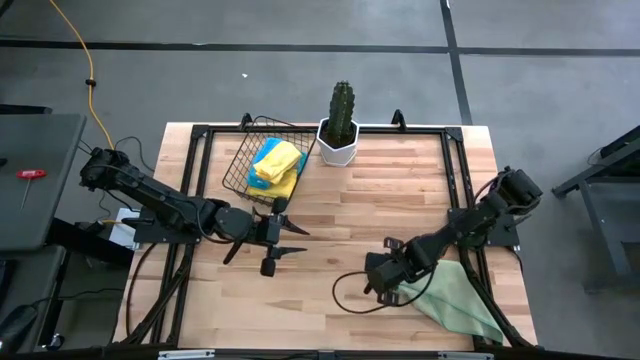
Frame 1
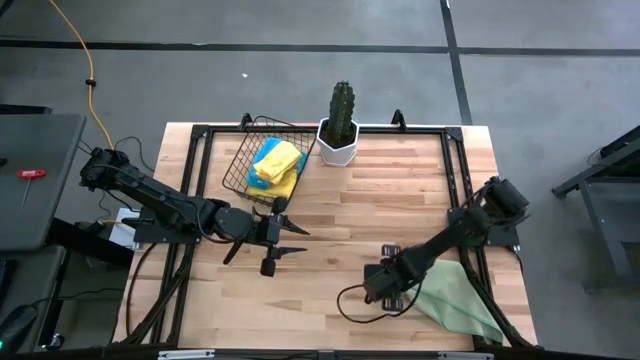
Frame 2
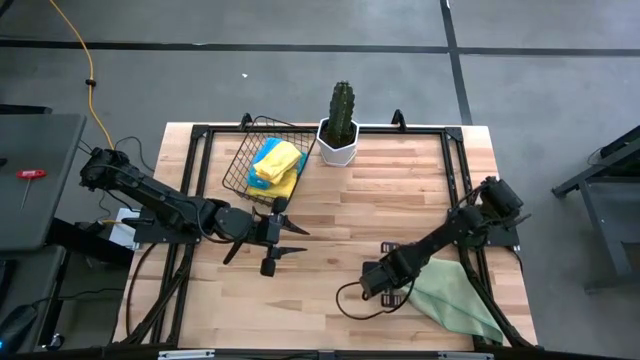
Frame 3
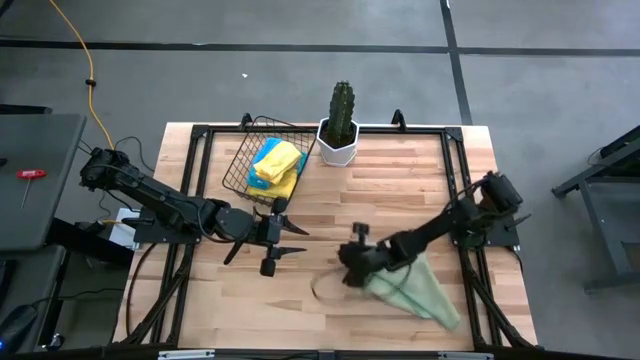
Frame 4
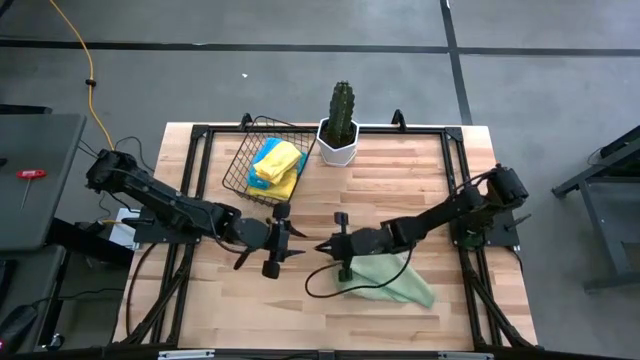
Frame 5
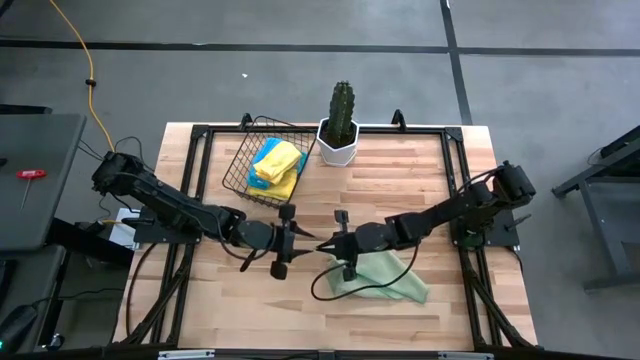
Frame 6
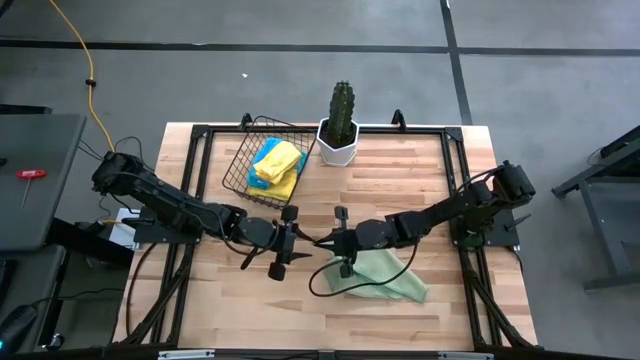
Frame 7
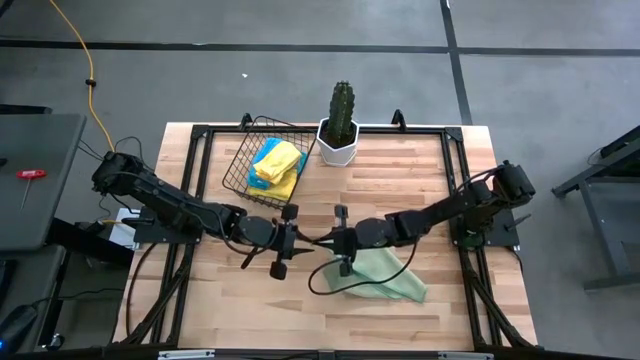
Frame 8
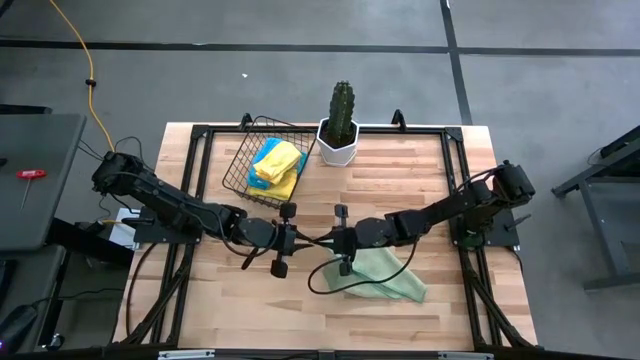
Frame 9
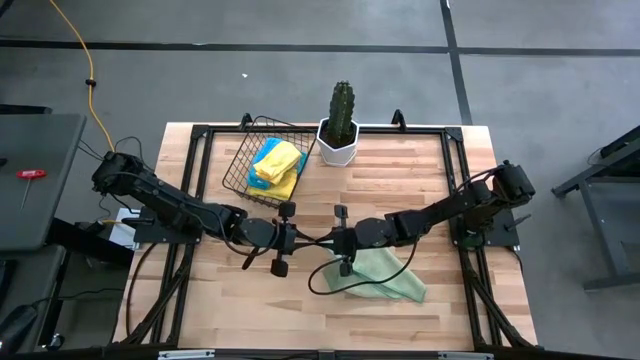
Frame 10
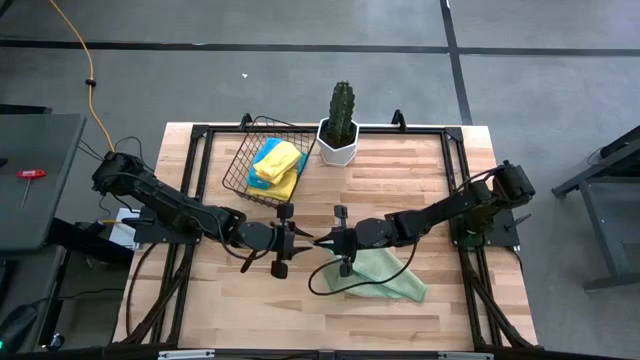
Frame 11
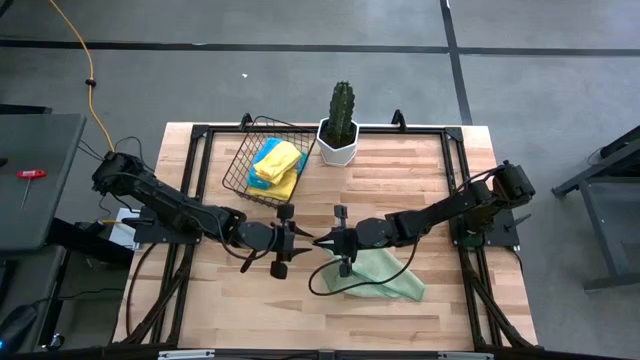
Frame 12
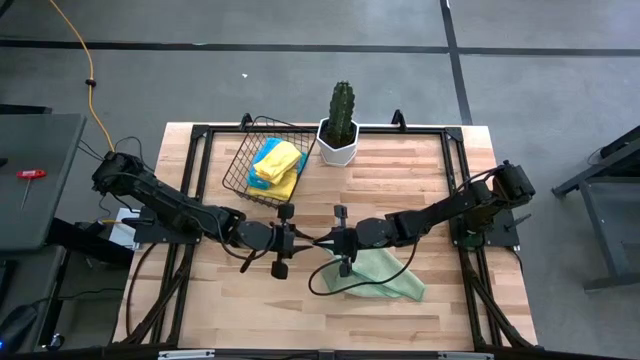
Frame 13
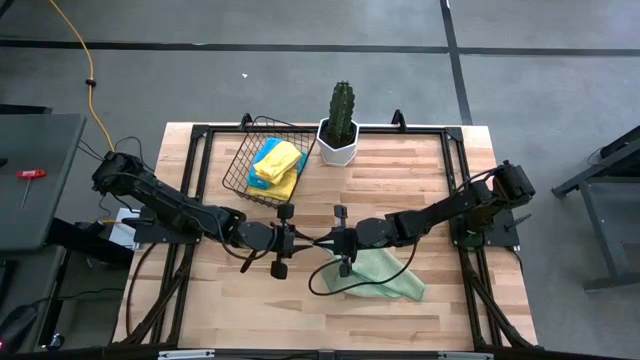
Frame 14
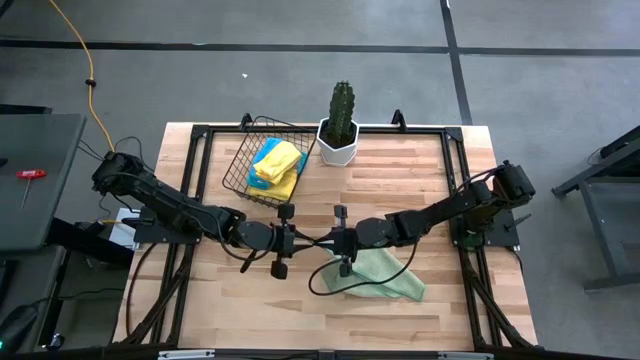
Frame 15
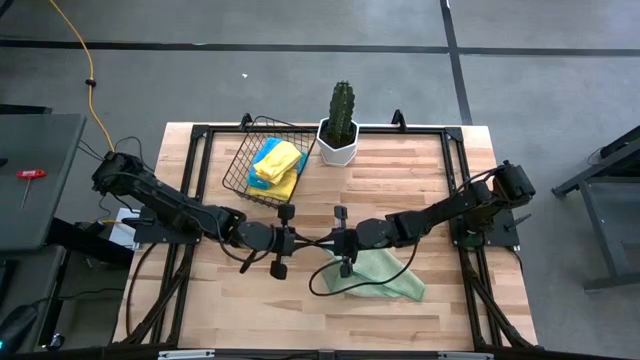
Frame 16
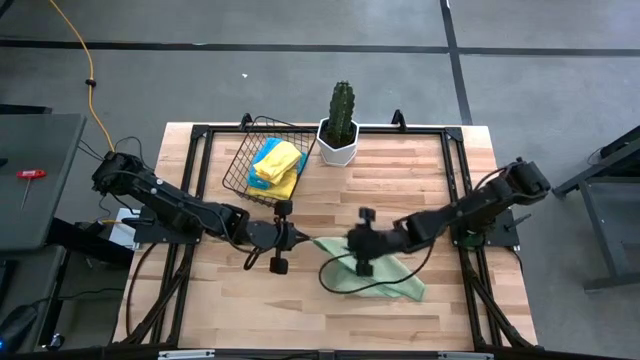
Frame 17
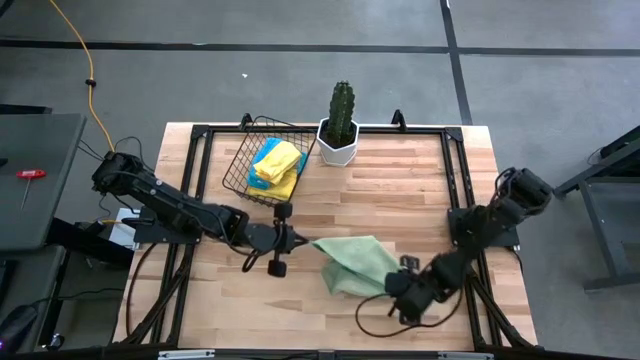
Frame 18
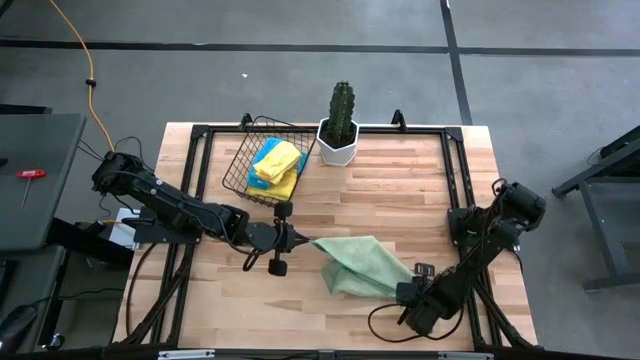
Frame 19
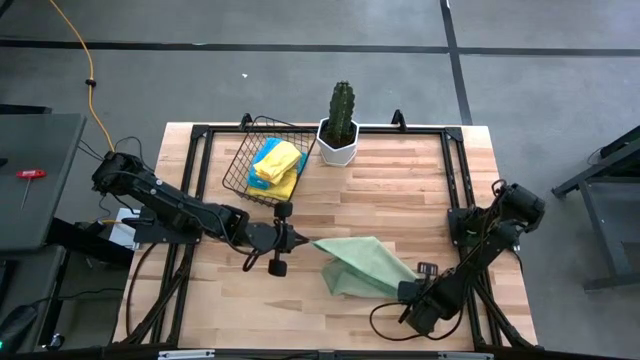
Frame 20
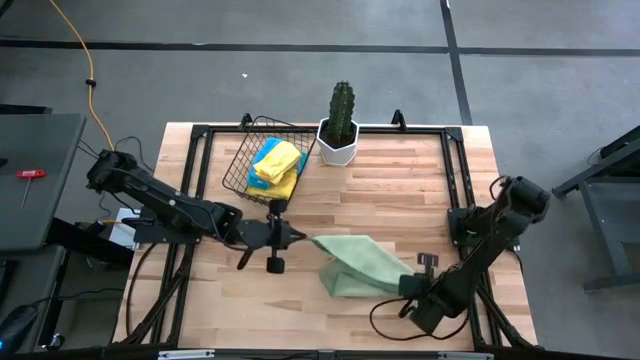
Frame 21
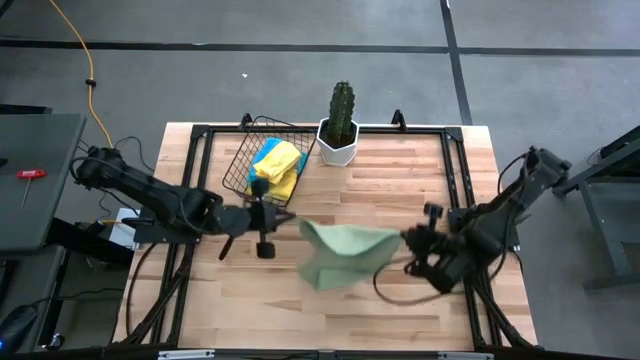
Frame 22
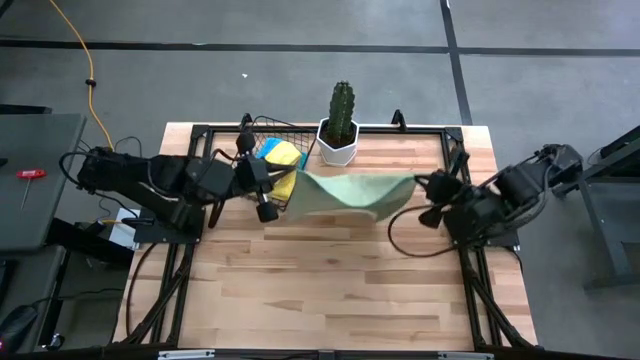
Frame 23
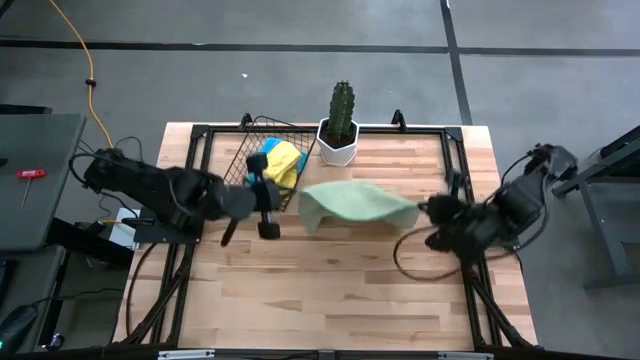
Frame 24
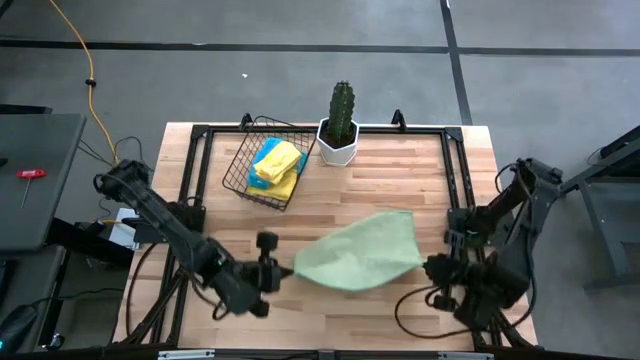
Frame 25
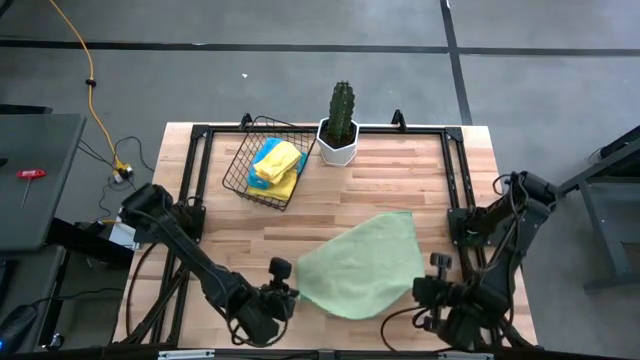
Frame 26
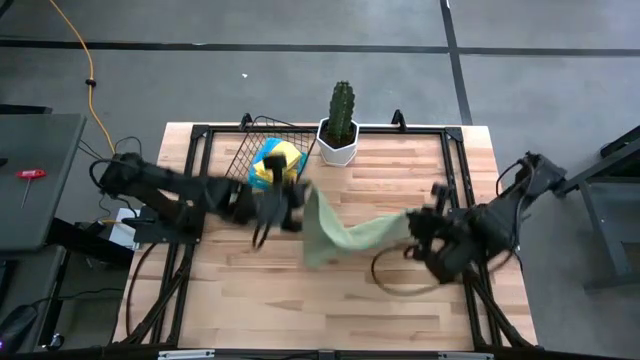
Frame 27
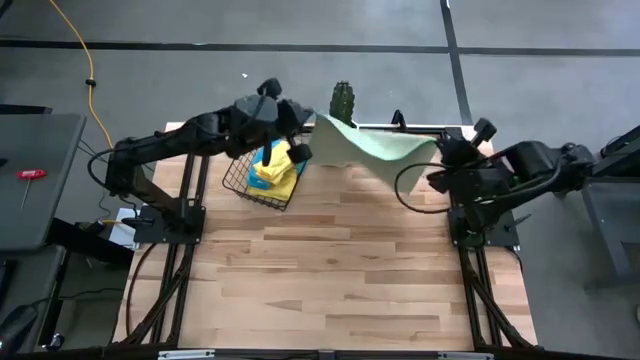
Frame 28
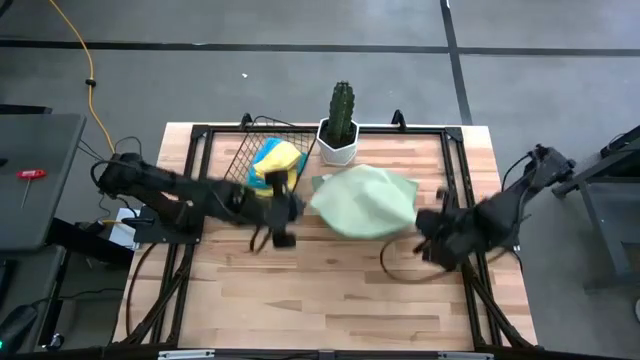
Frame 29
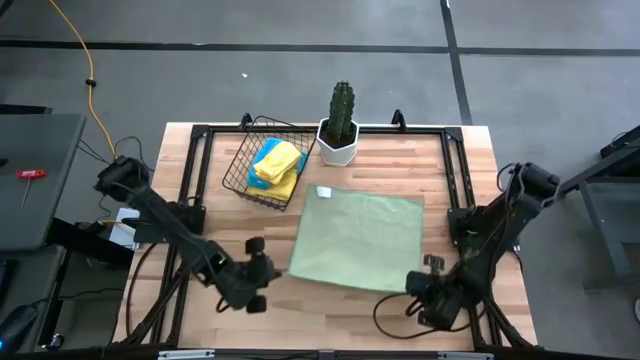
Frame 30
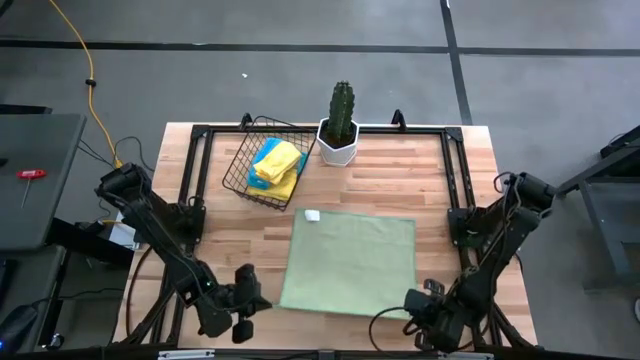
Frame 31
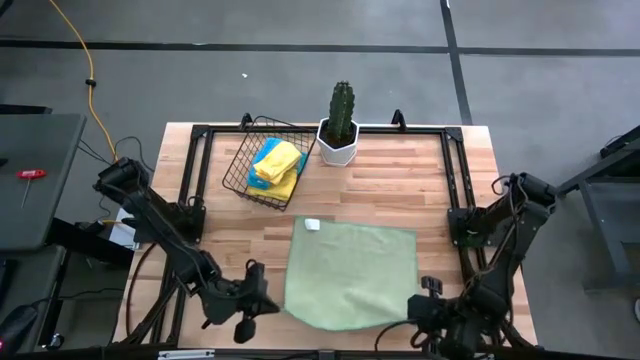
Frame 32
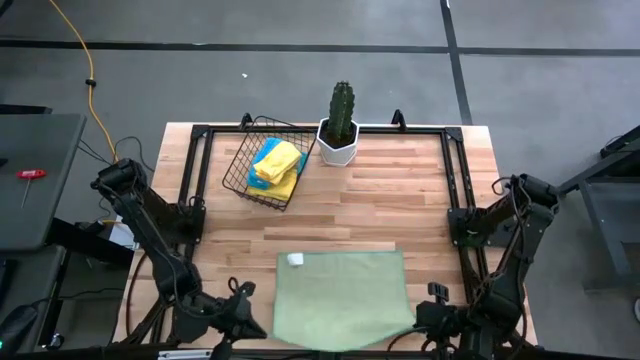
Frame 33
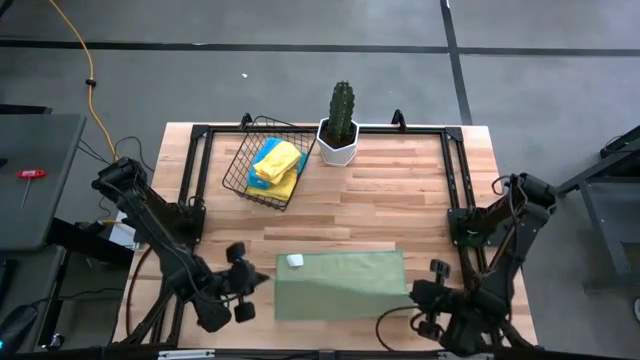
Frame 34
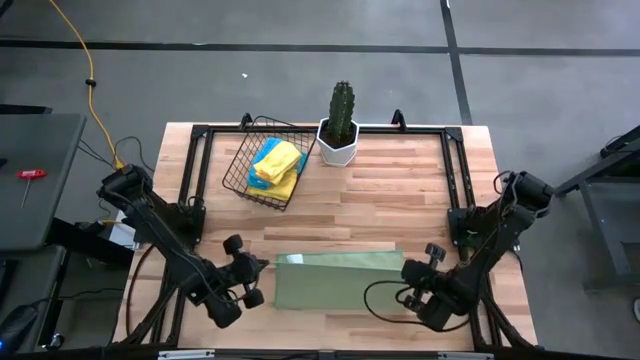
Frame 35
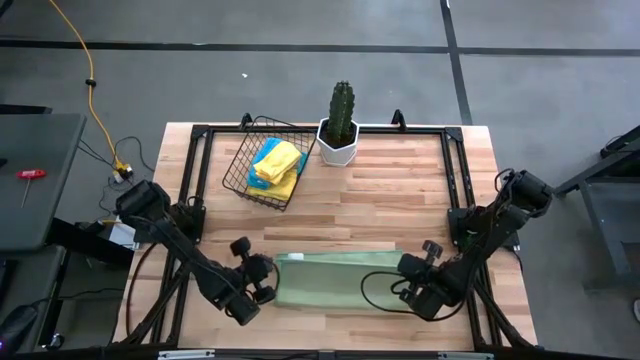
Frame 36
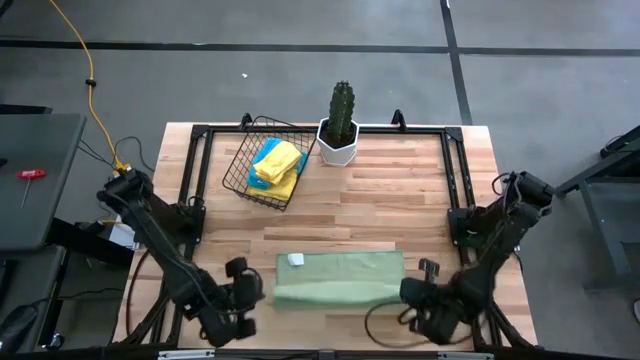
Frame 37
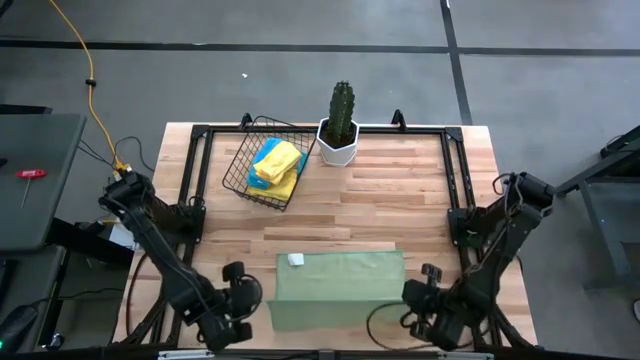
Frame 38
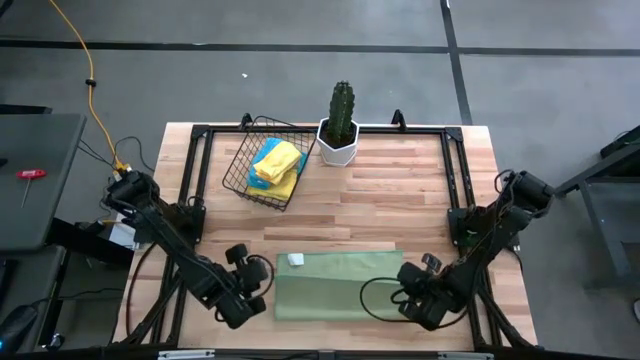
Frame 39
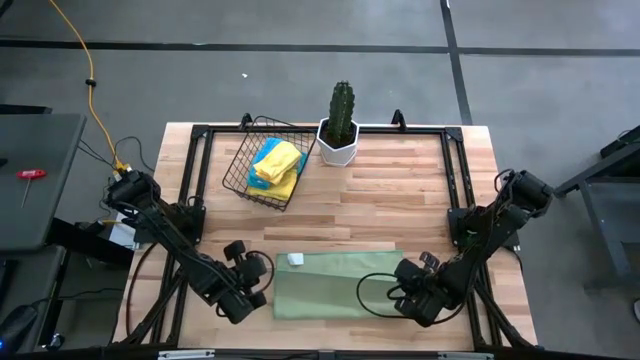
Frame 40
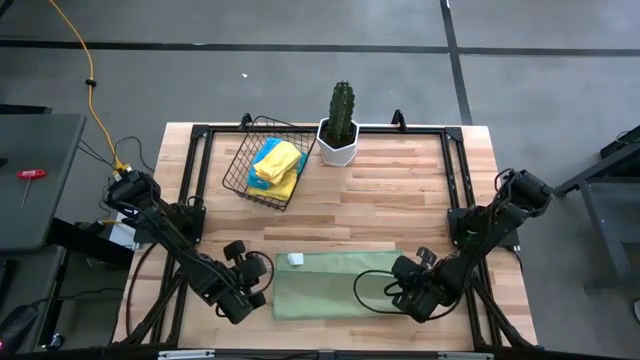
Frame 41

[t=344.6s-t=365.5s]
Task: Fold microfiber towels
Fold the green microfiber towel on the table

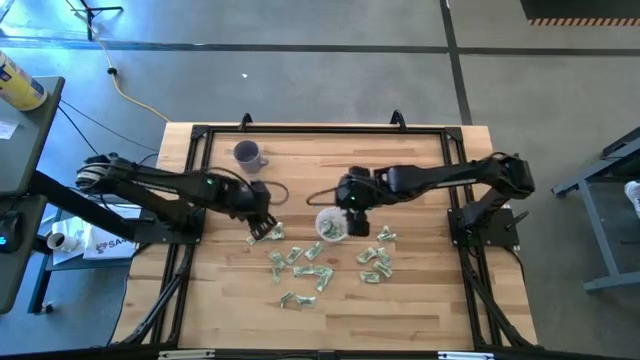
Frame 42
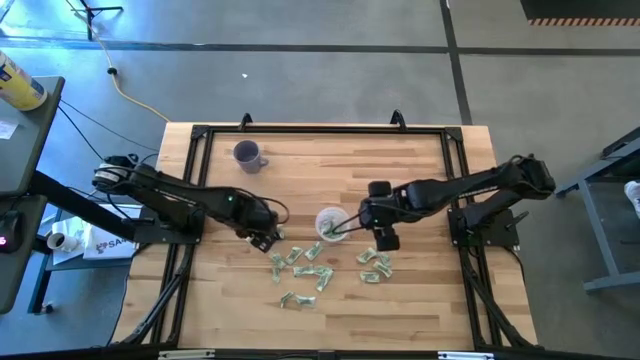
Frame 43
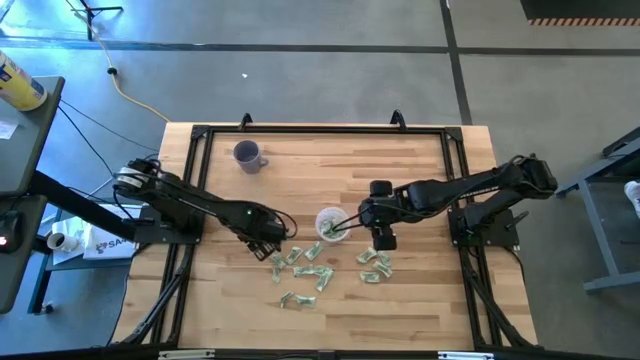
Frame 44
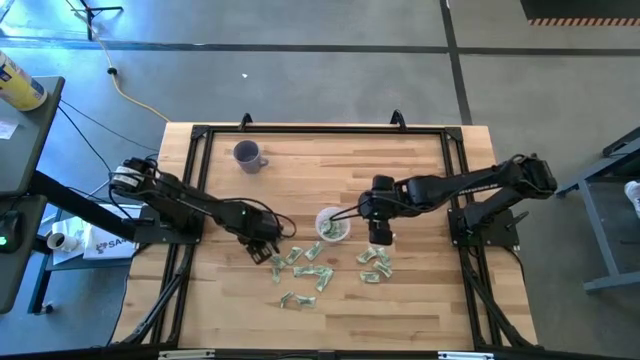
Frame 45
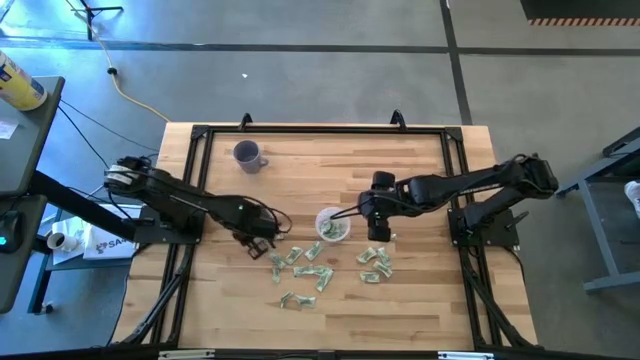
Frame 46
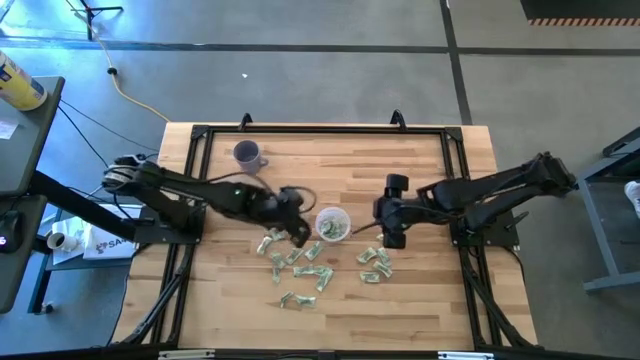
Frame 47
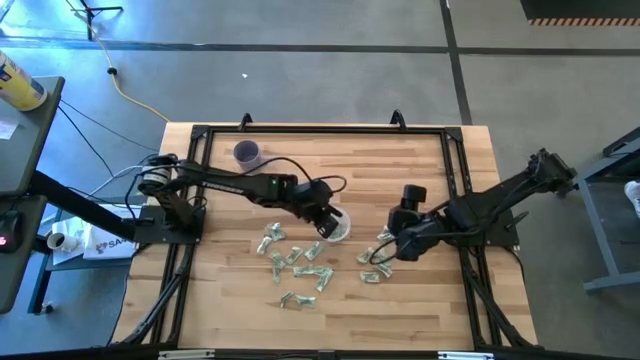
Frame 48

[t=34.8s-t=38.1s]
Task: Pick and place Stevia / Truvia into bins
Put the stevia packet into the transparent container
